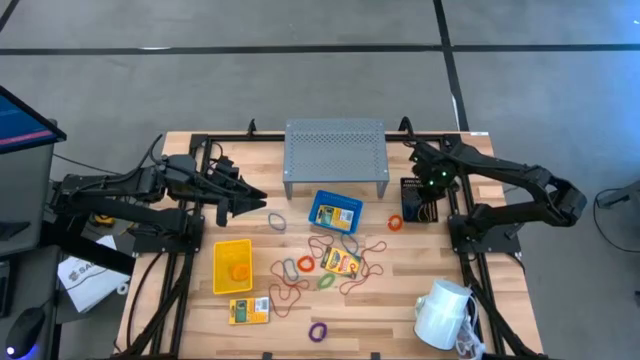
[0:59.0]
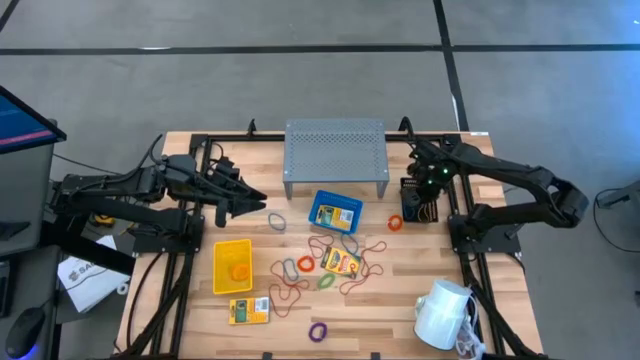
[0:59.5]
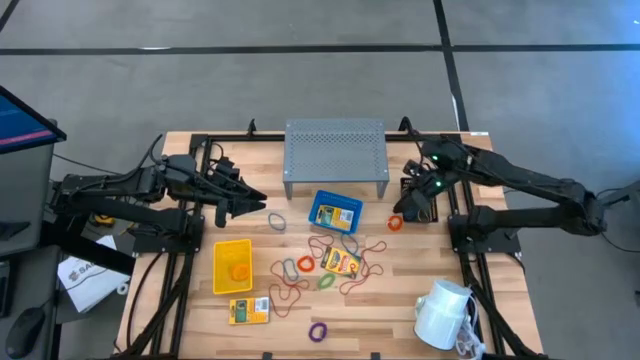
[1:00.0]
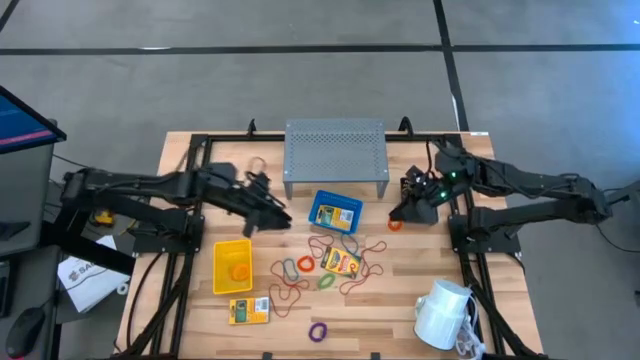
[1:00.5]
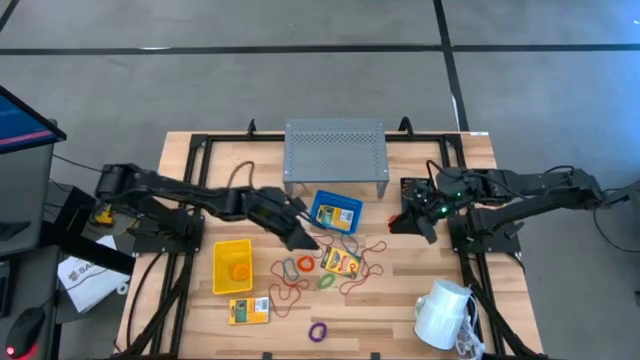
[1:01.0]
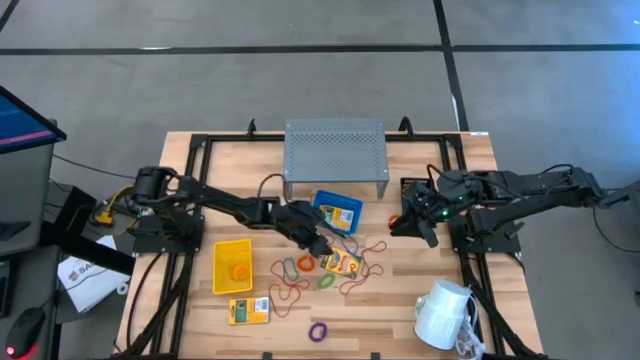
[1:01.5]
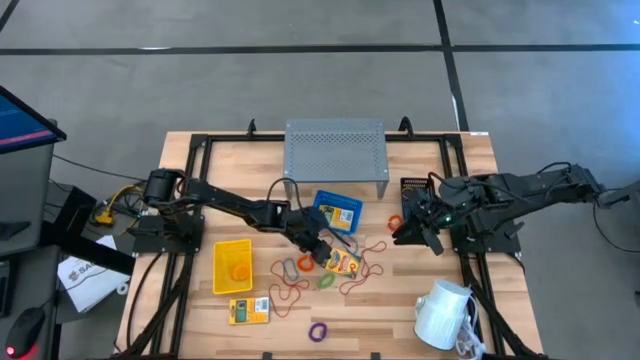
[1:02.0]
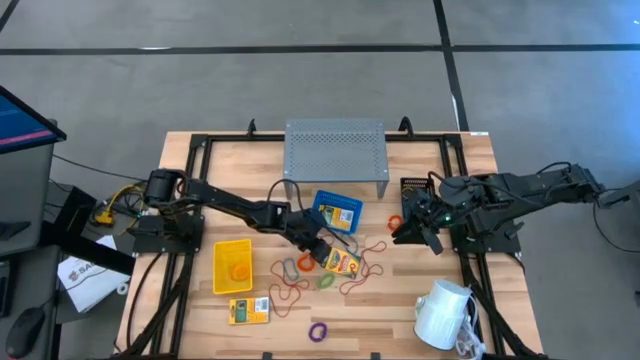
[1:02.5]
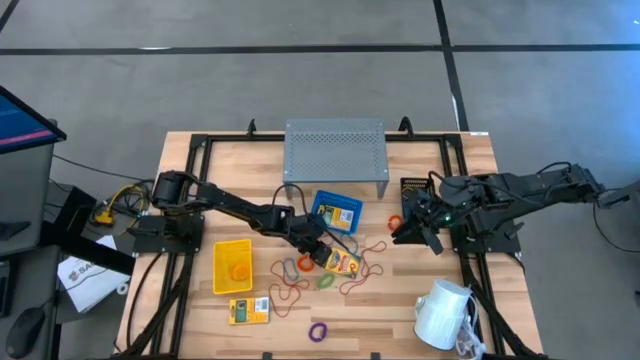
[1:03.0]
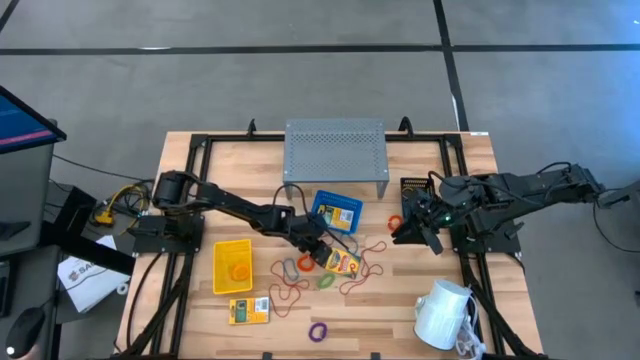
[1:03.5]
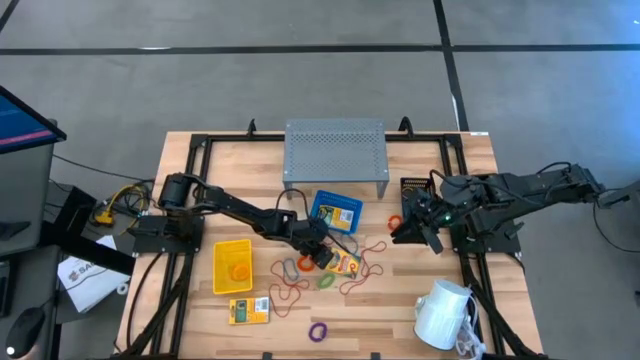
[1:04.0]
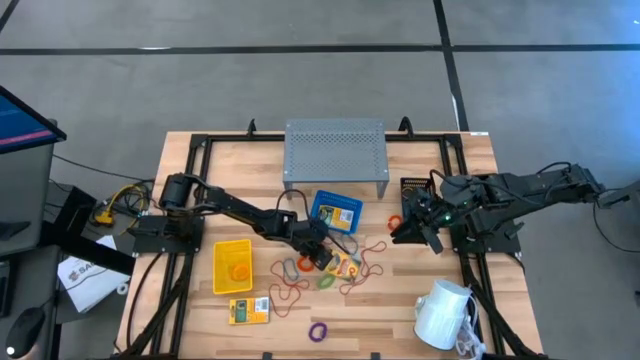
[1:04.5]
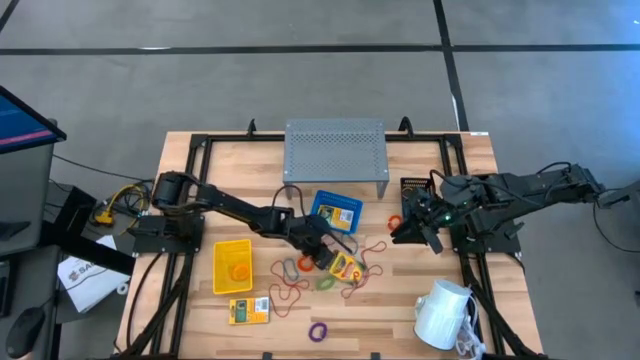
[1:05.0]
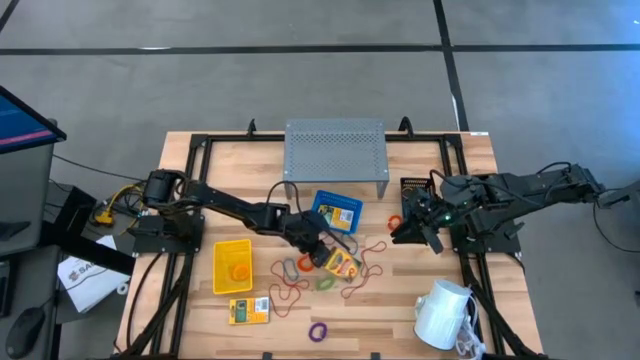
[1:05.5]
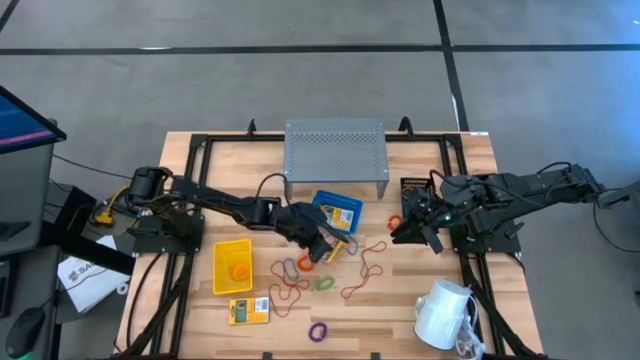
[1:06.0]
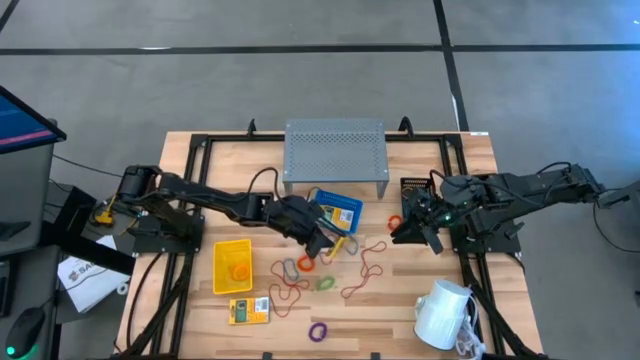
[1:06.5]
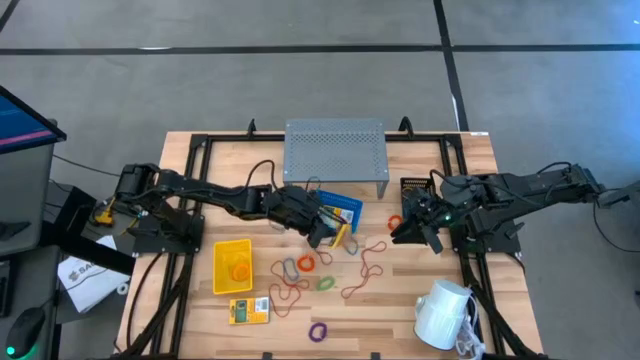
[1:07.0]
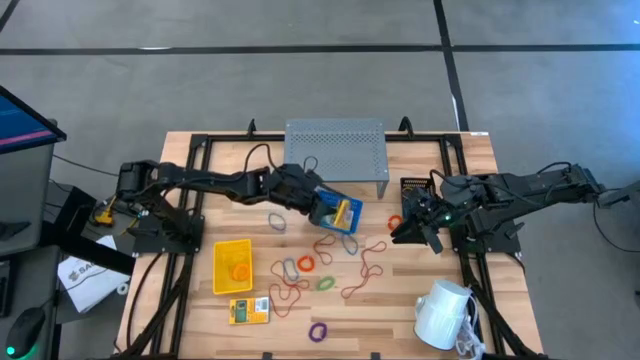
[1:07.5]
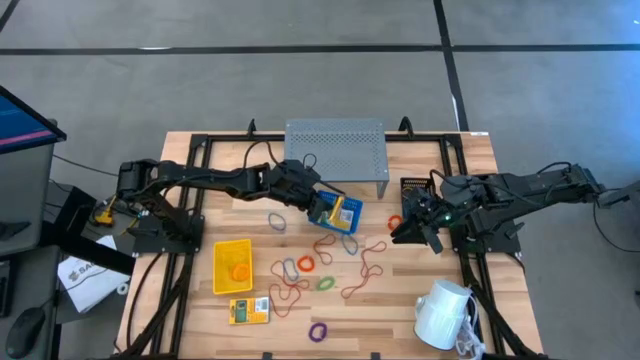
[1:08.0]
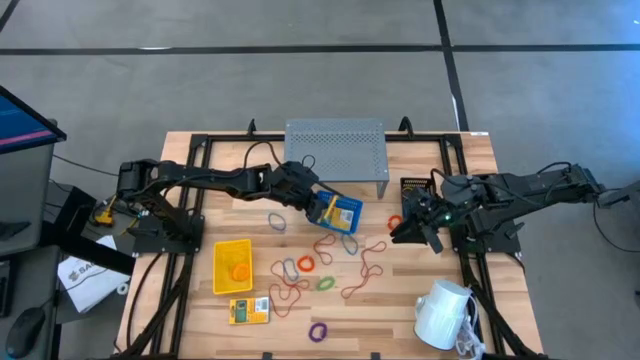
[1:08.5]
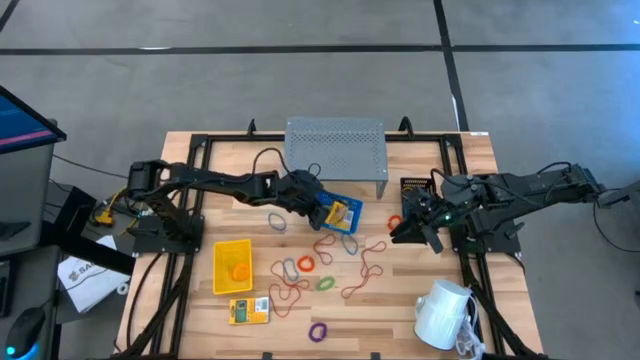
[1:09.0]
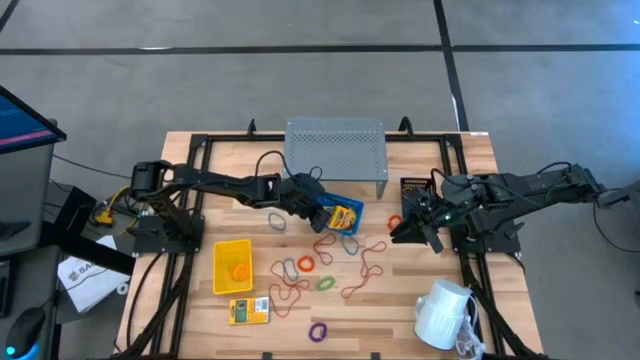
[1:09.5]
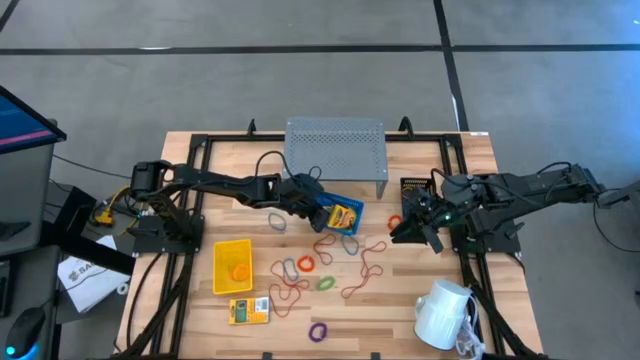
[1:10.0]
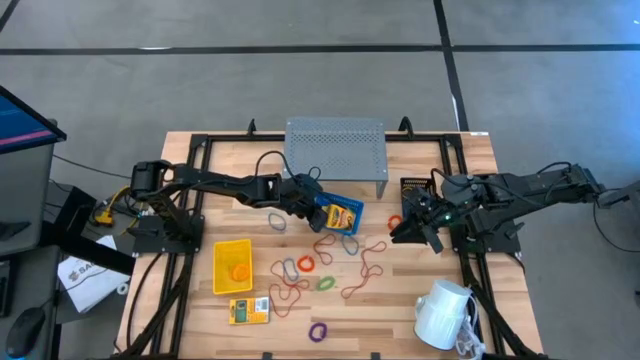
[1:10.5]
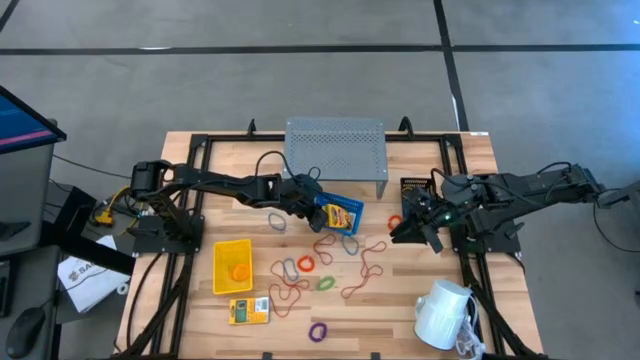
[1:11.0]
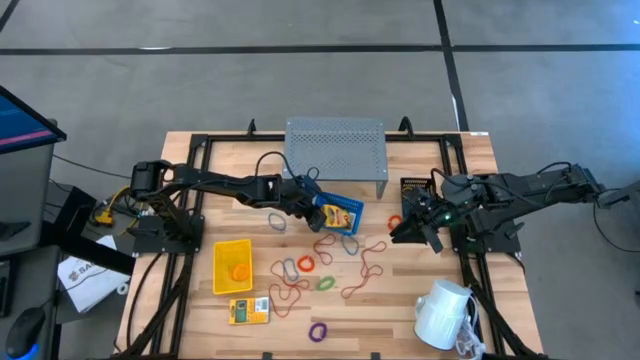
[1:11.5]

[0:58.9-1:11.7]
Task: Pick & Place Office Desk Supplies
Put the yellow crayon box into the blue bin

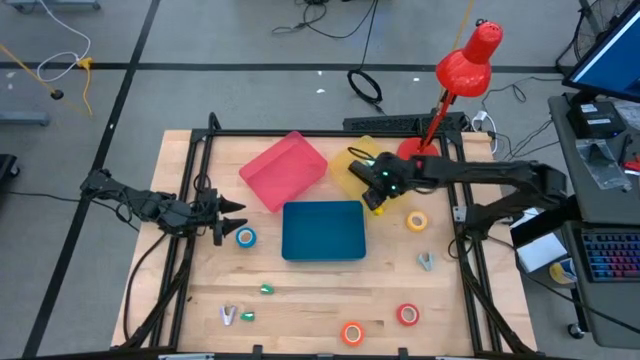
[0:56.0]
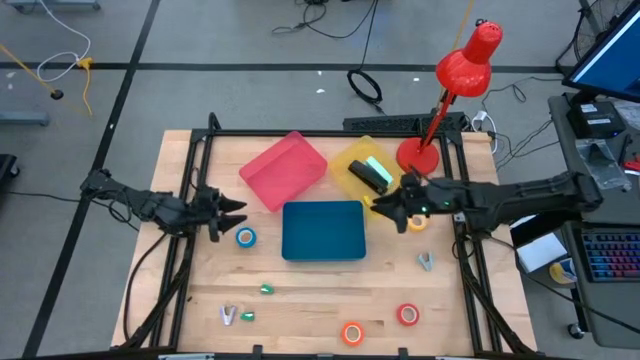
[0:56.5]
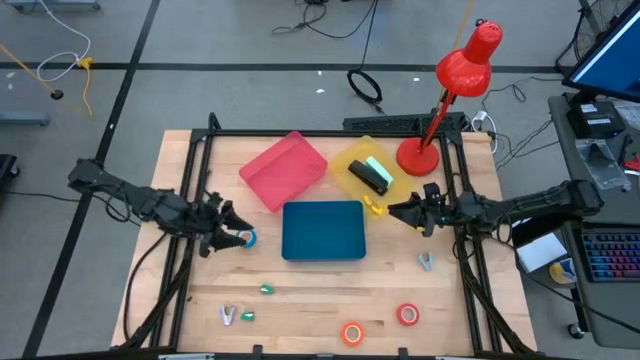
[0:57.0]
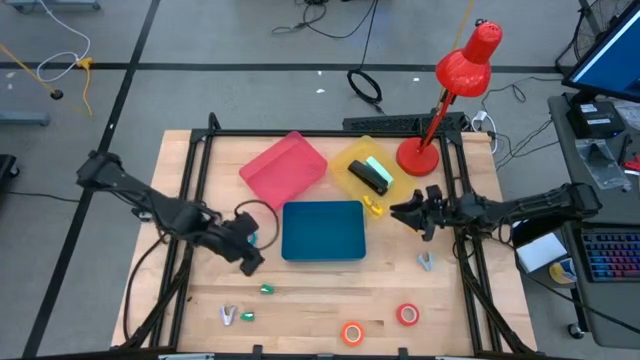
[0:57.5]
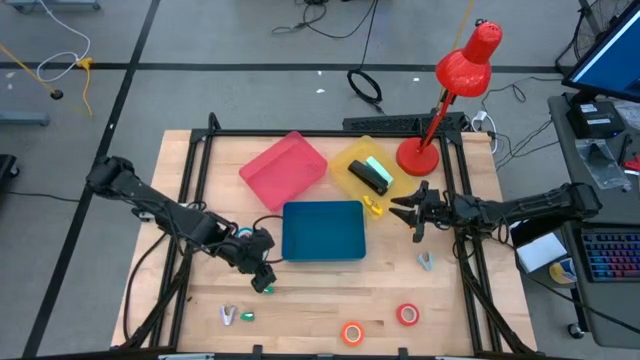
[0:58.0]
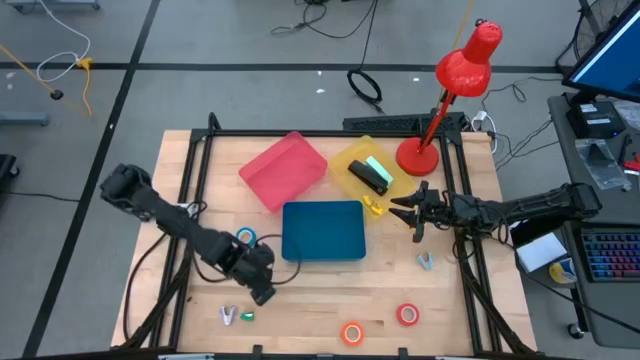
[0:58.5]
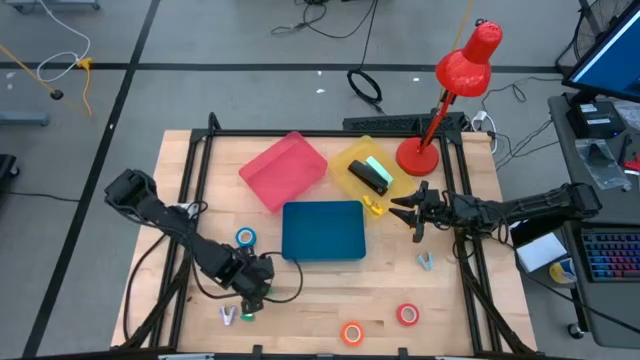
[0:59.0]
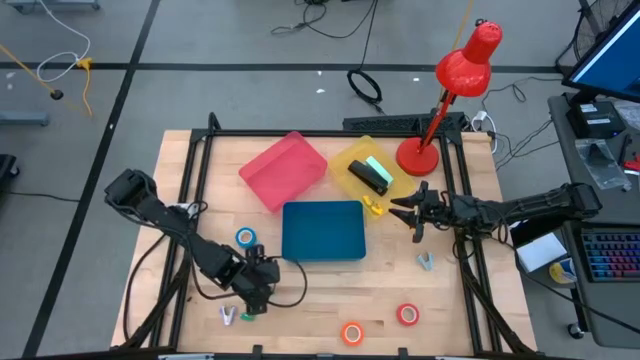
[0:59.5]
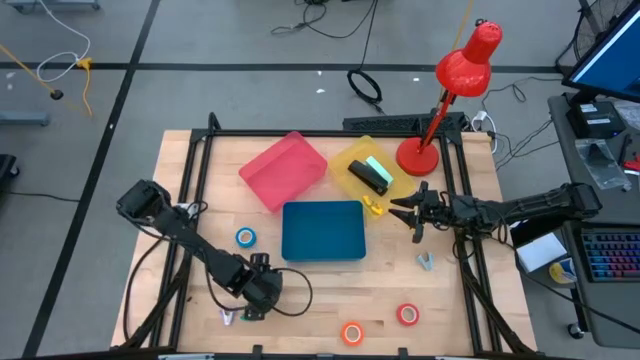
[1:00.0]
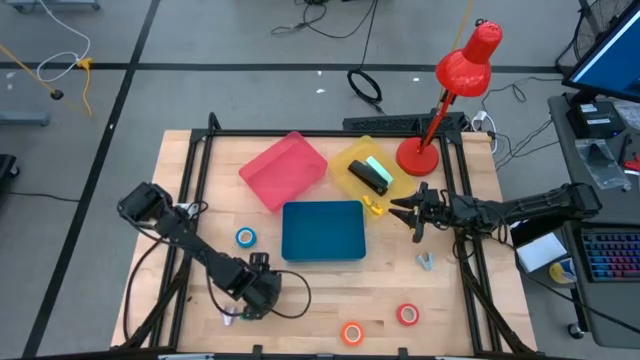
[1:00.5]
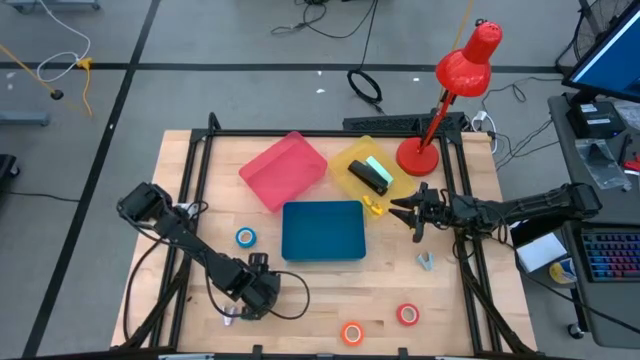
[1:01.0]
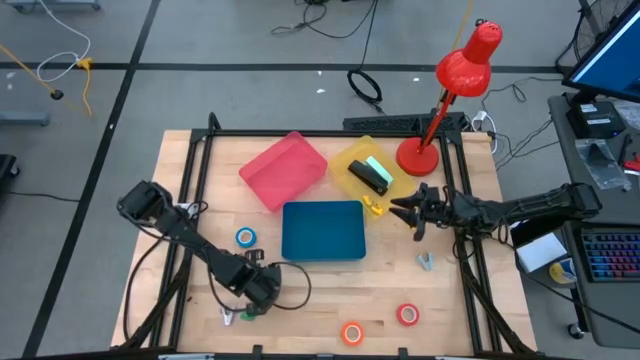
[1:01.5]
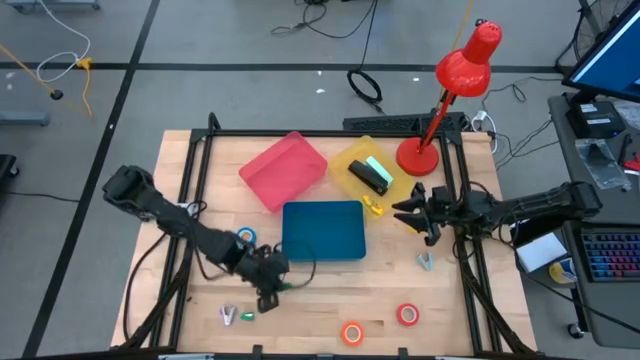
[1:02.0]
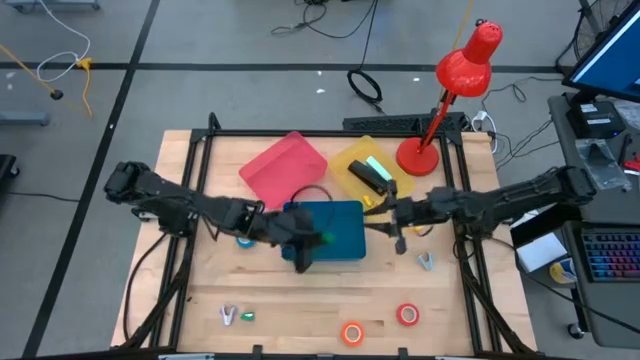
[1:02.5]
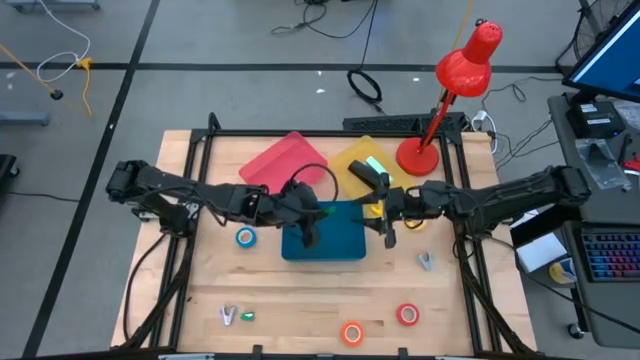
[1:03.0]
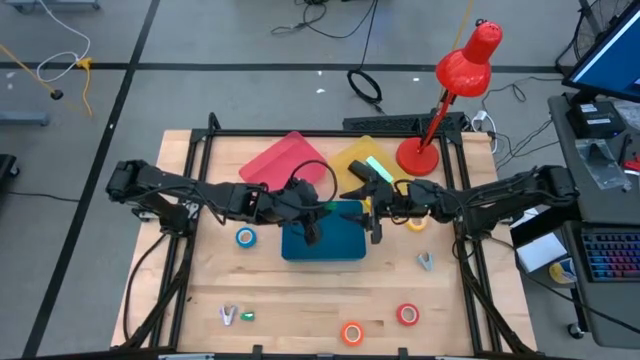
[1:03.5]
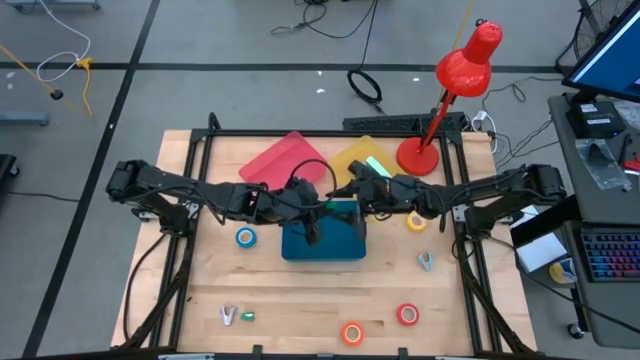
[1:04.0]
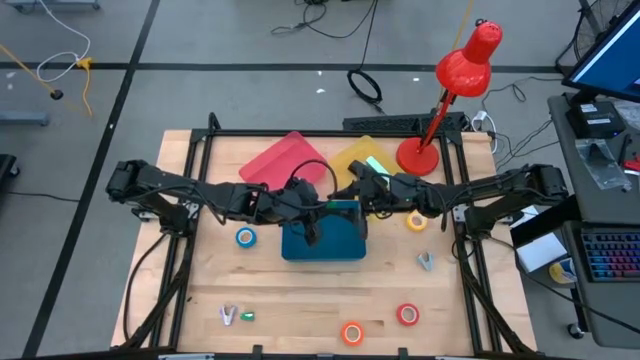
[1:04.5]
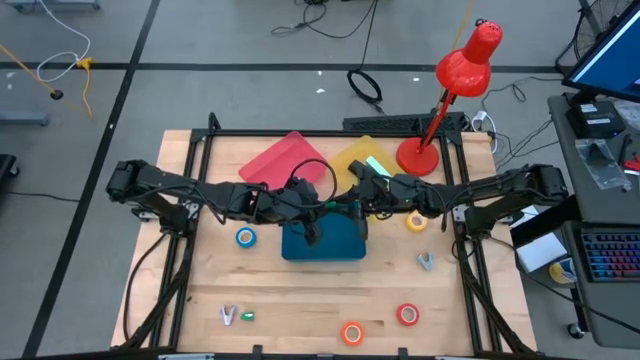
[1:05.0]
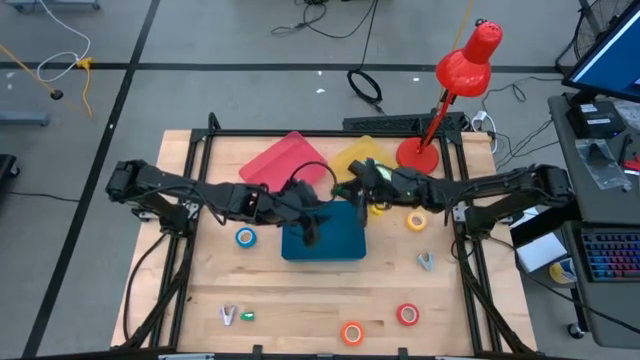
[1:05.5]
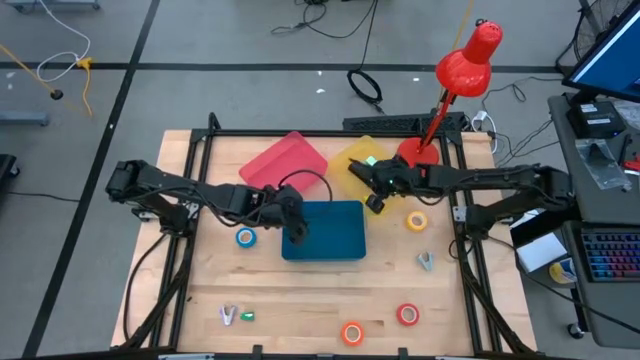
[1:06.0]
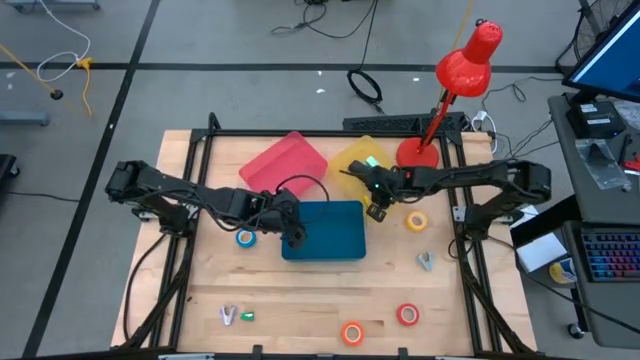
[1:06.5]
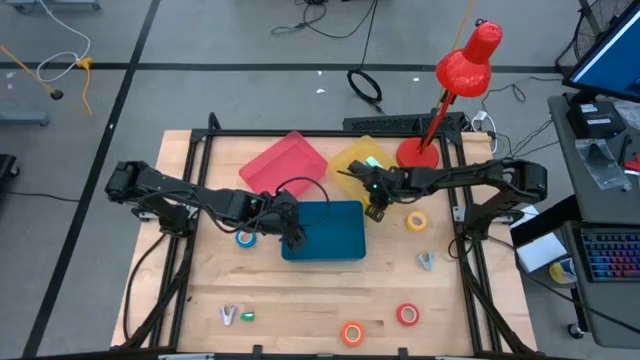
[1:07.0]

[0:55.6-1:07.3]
Task: Pick and place Stapler, Stapler remover, tape
Put the top green stapler into the yellow bin
